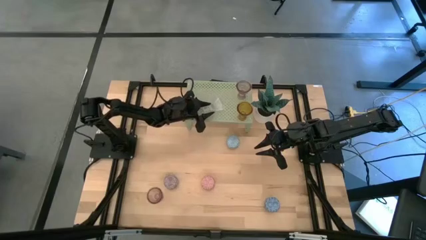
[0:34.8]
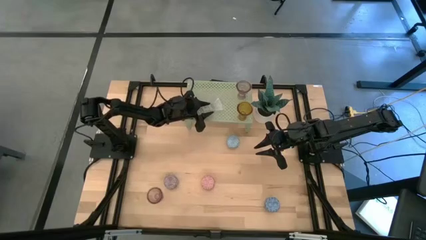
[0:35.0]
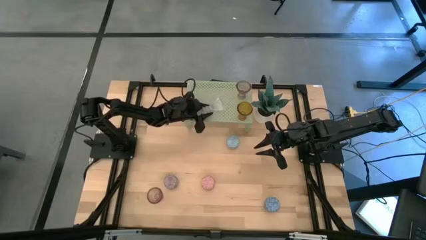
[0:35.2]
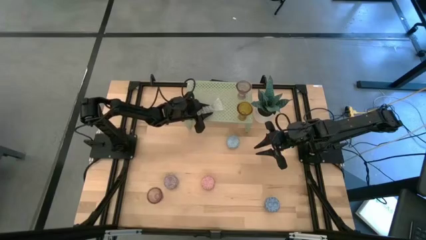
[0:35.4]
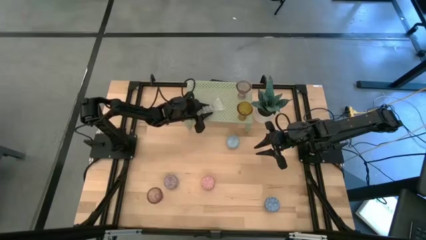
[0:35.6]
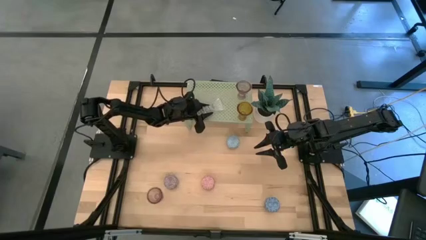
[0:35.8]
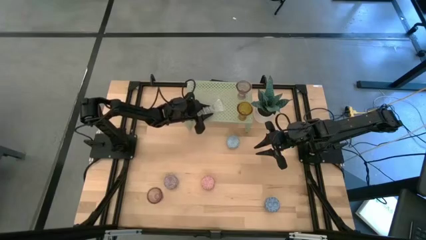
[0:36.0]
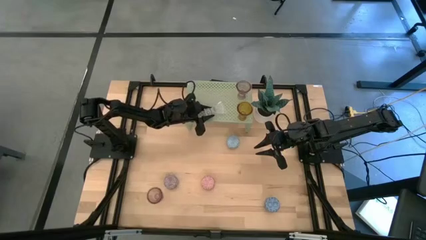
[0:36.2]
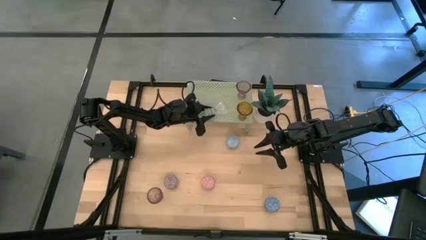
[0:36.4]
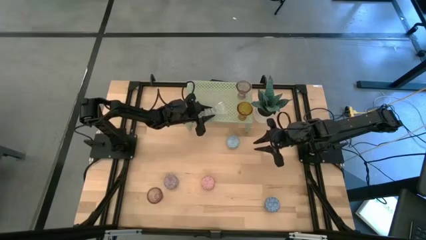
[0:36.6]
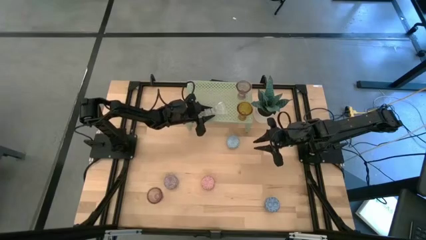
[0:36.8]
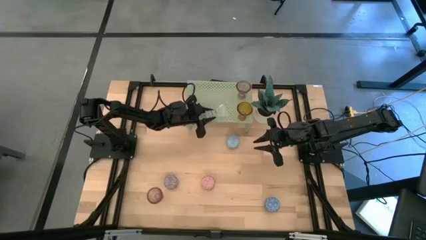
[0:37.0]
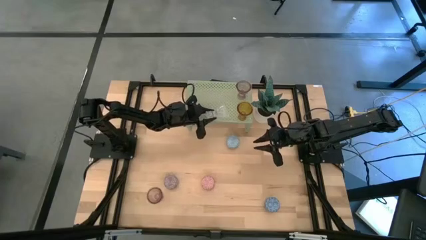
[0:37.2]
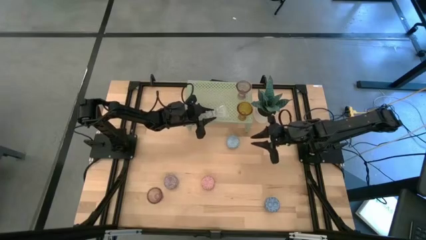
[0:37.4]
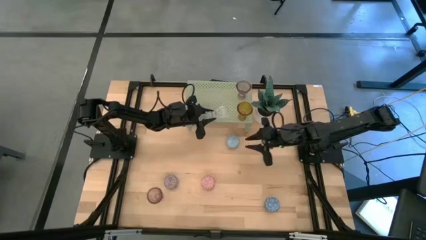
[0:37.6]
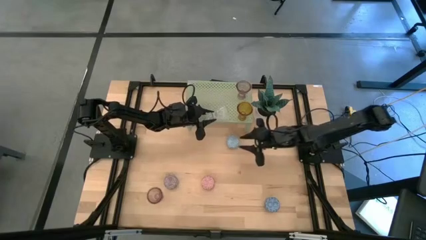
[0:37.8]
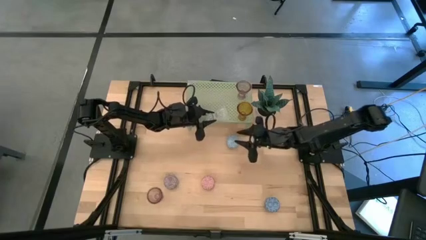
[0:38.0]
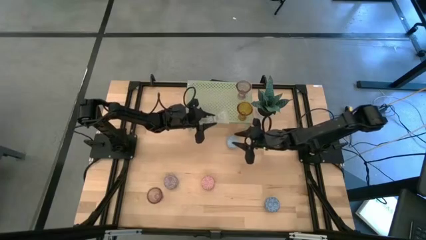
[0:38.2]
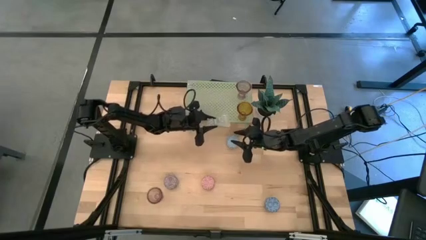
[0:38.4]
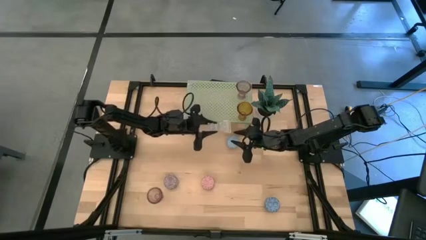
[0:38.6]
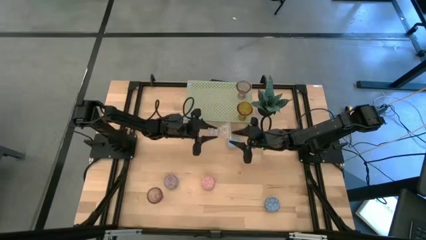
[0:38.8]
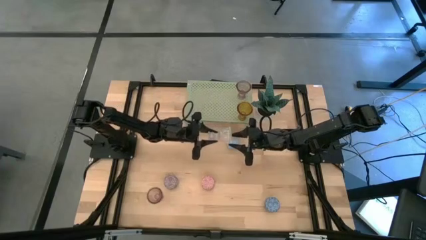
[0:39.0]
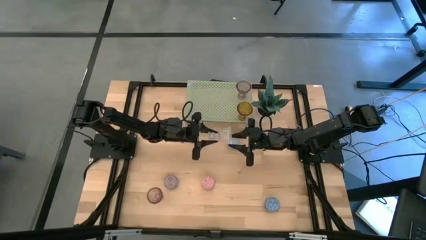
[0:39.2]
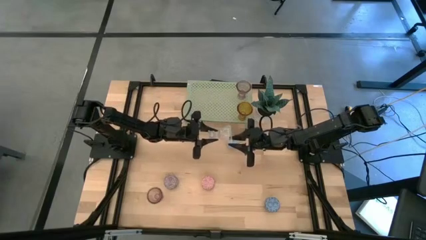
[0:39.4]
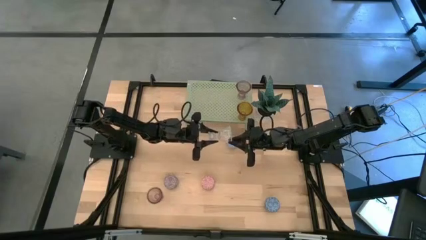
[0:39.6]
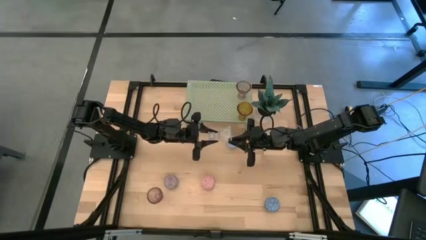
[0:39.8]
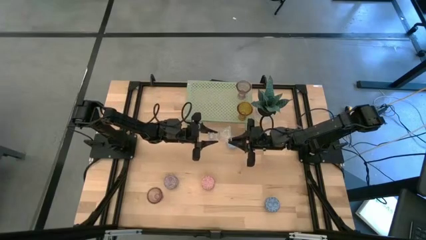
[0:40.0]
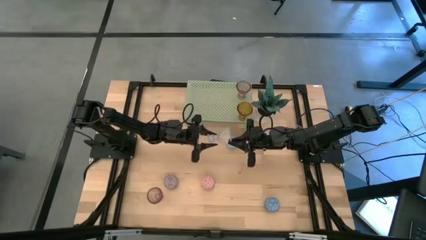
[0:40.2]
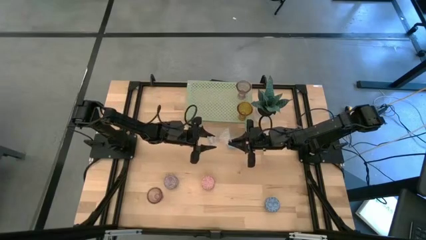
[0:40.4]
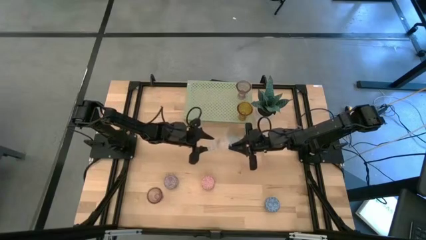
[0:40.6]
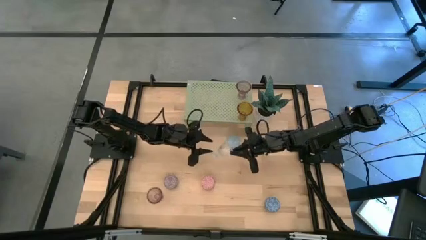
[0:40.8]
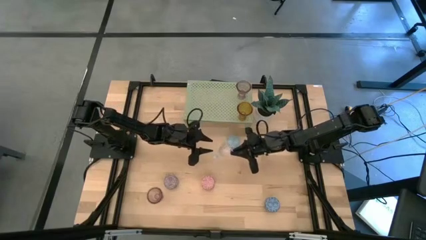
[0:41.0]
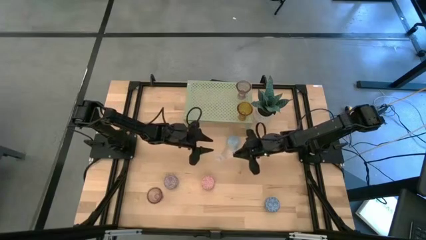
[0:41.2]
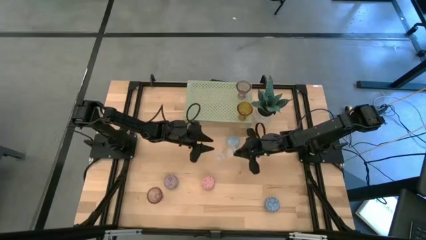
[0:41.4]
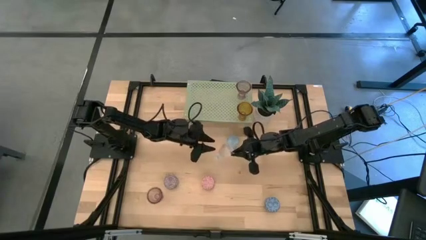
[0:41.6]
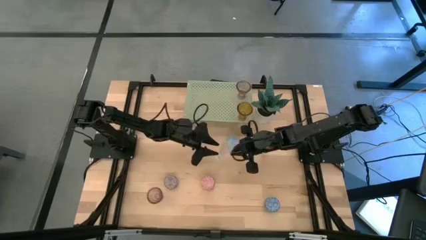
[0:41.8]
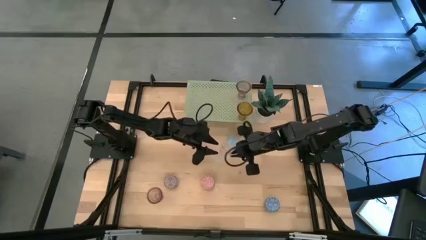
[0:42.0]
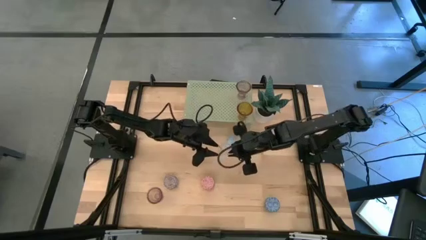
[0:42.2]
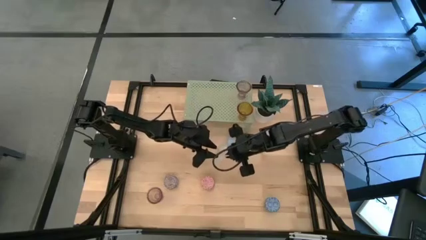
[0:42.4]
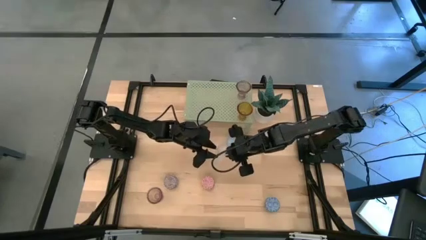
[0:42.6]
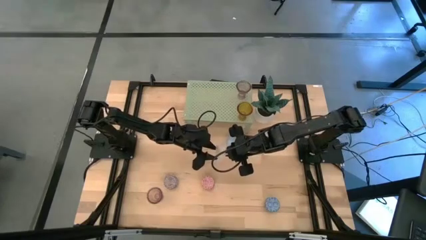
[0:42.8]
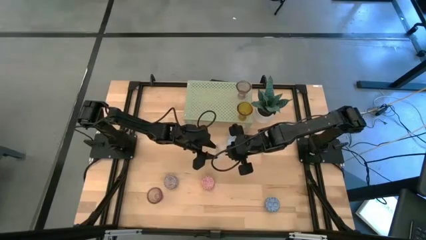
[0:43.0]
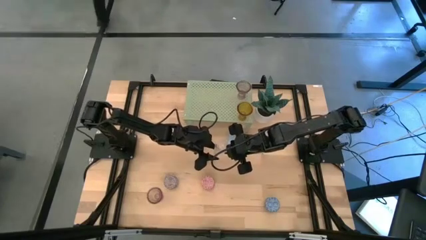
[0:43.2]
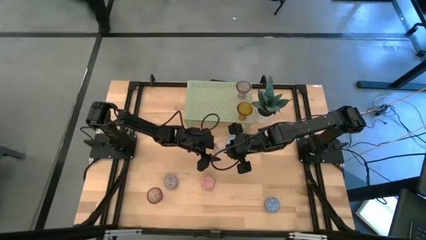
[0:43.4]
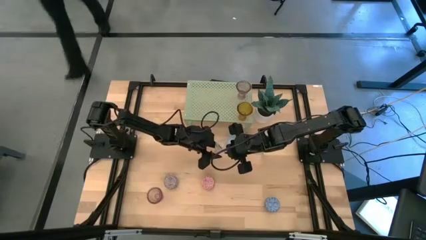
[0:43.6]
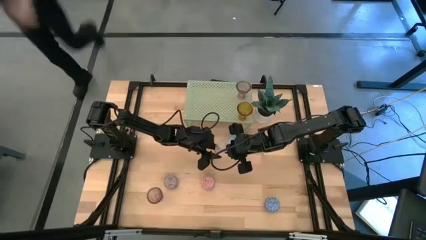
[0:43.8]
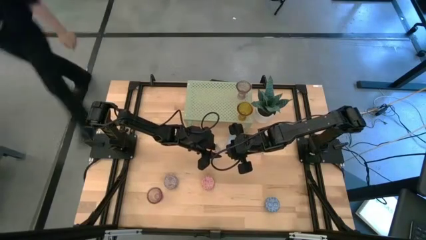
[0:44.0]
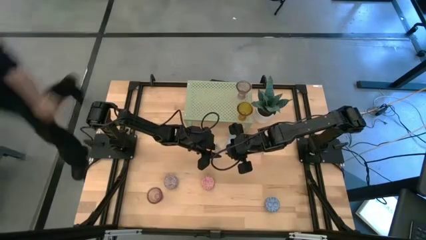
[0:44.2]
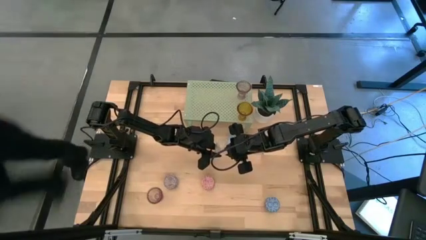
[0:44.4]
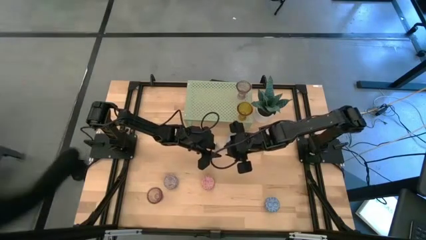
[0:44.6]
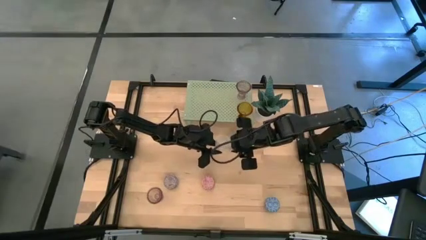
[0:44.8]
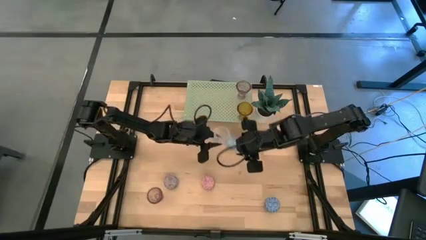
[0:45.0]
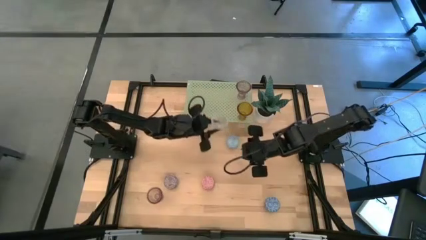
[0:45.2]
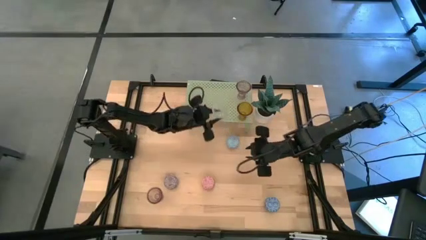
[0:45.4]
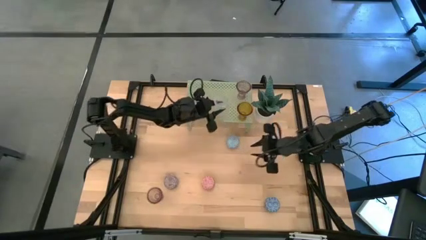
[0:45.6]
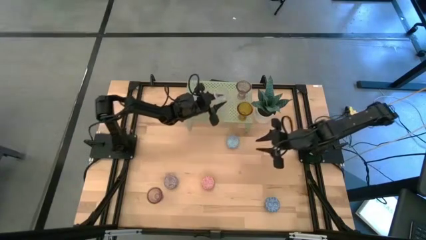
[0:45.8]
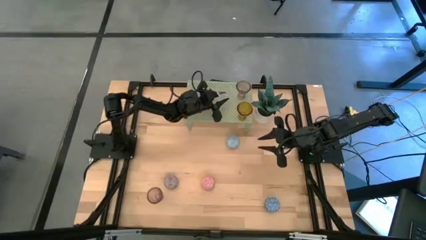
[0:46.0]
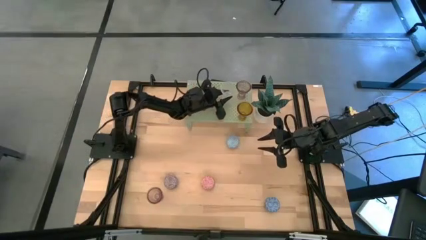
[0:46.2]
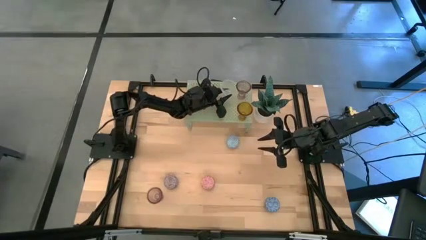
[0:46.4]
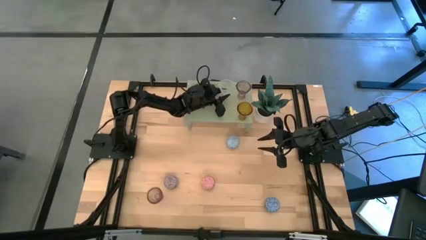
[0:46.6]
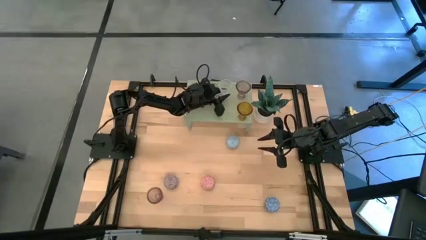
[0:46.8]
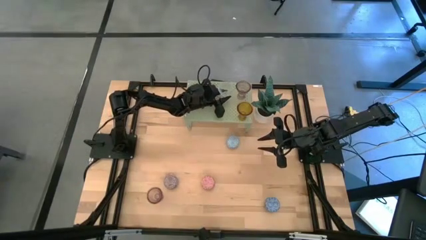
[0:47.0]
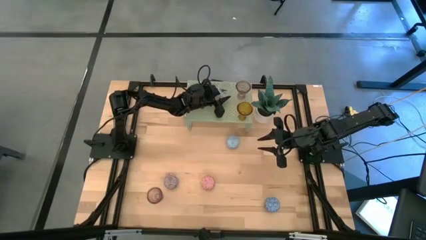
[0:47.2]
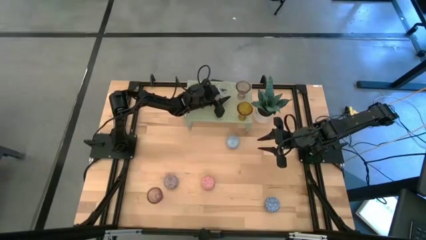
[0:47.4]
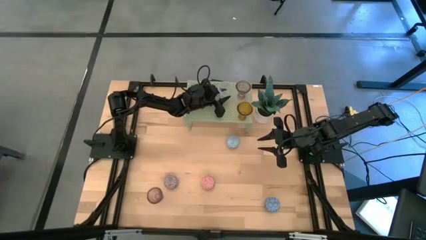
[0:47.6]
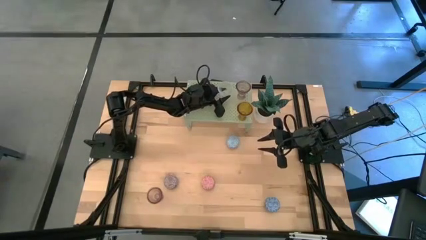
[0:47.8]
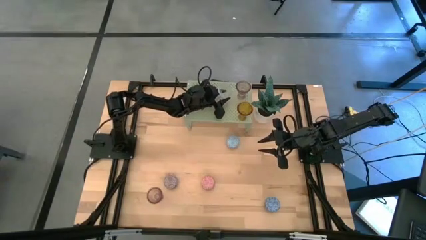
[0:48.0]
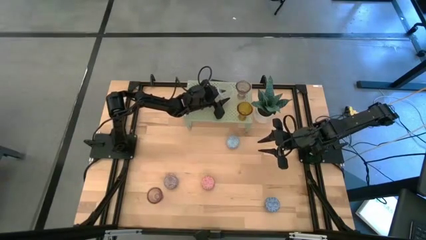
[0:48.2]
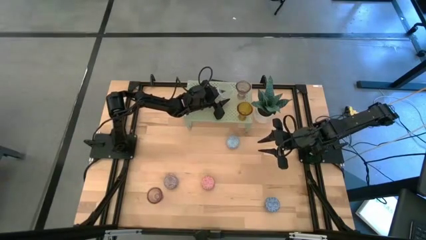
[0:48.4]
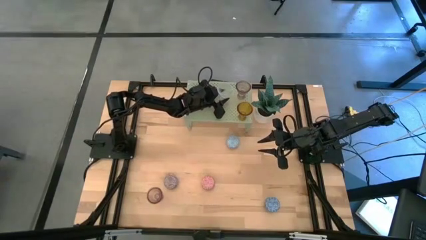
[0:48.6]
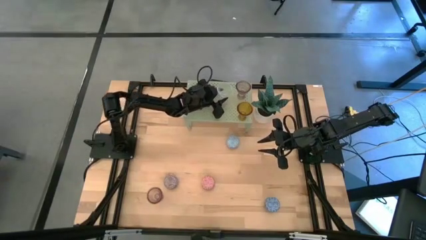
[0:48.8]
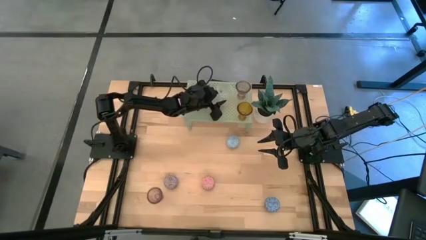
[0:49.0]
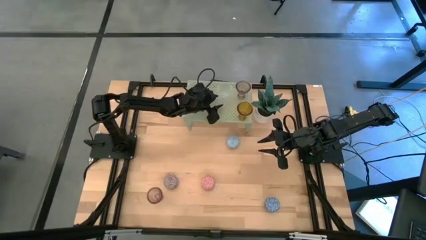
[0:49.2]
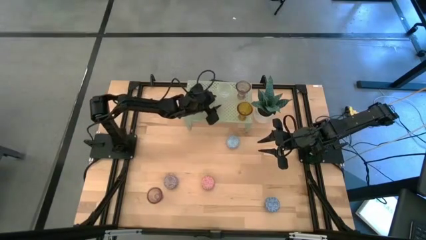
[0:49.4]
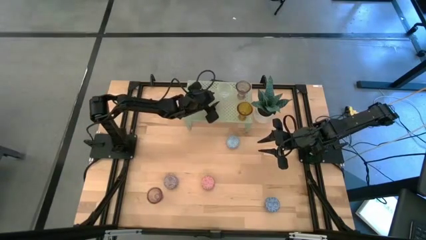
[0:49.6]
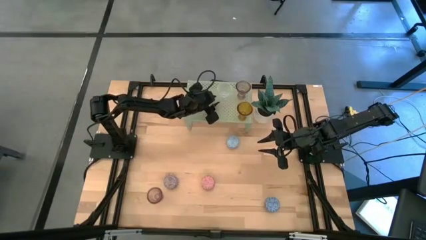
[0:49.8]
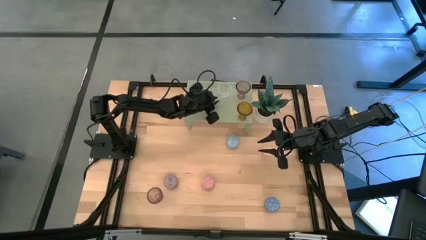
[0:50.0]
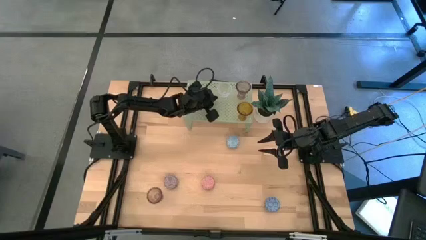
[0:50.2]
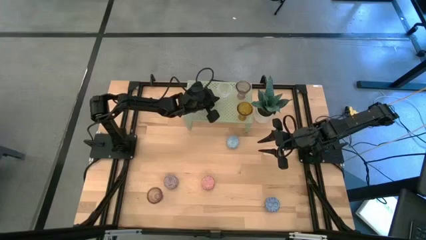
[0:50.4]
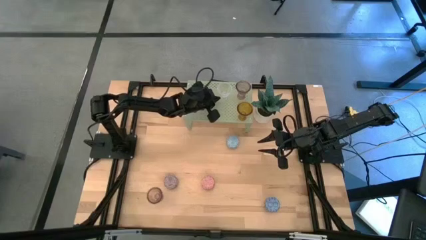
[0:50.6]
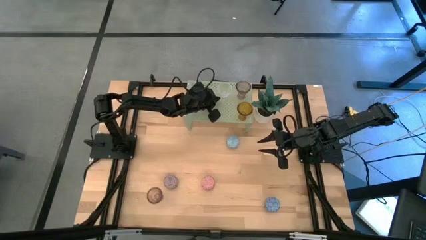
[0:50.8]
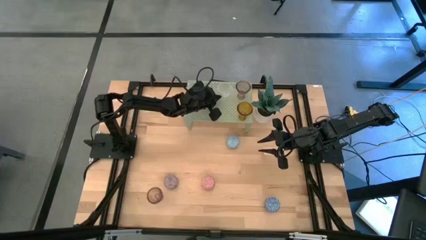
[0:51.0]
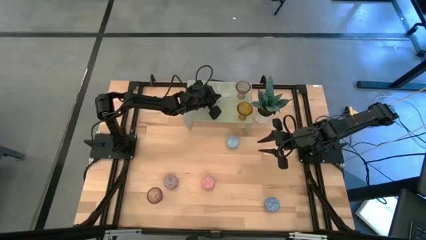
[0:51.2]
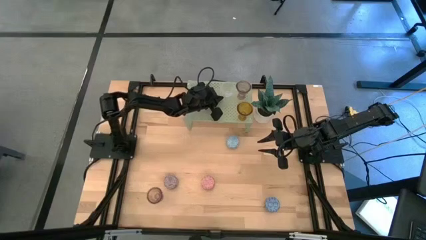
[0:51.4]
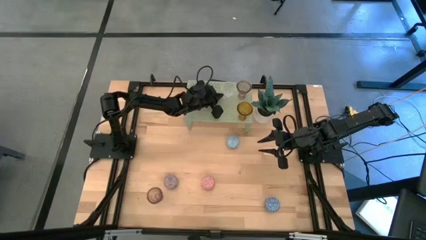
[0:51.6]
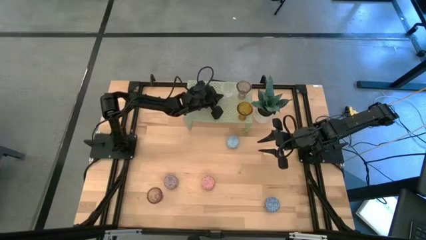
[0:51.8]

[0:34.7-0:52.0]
Task: Pick & Place candle stick holders
Put the transparent glass candle holder on the shelf
